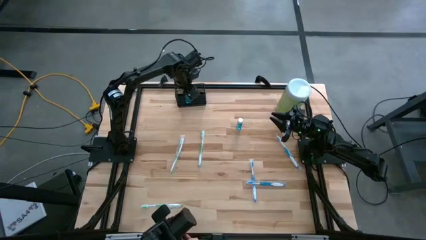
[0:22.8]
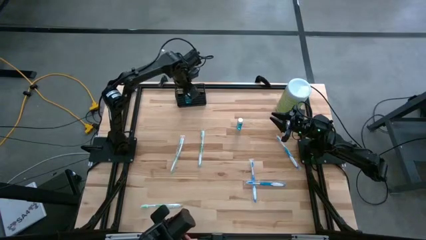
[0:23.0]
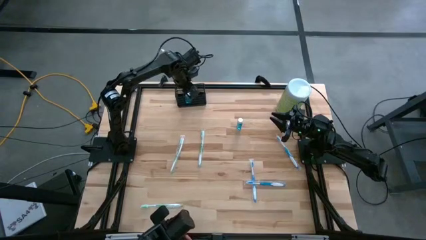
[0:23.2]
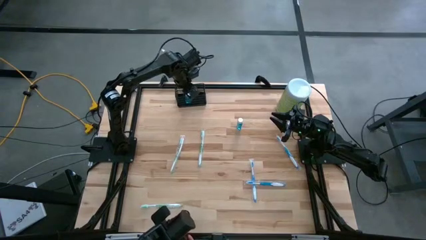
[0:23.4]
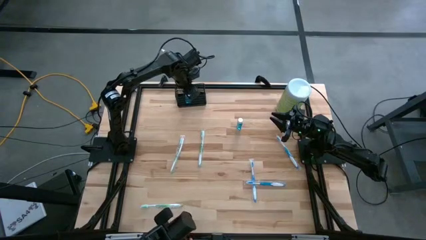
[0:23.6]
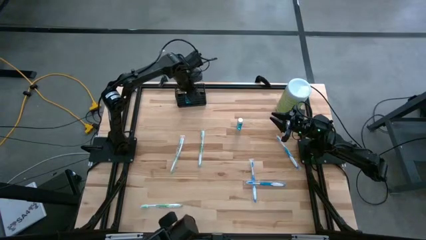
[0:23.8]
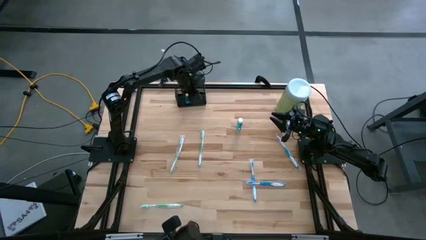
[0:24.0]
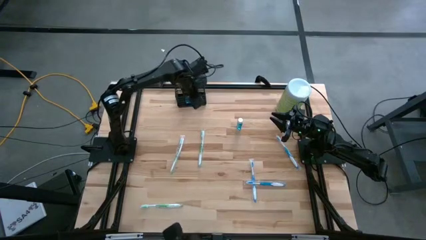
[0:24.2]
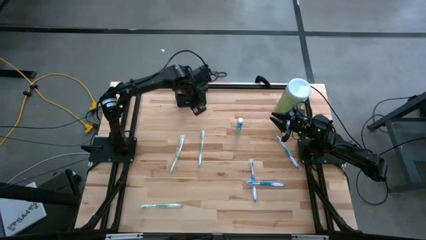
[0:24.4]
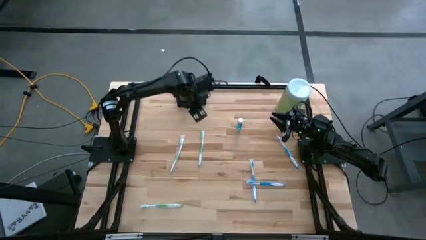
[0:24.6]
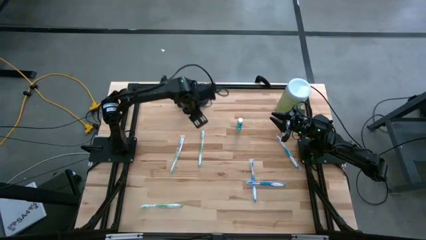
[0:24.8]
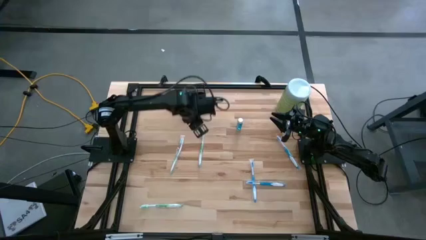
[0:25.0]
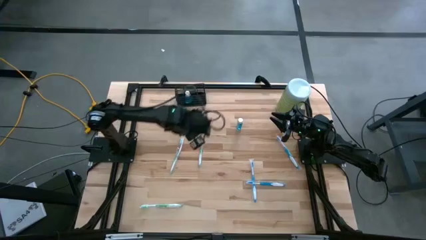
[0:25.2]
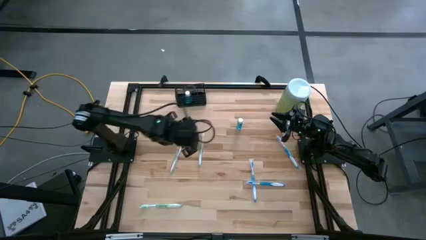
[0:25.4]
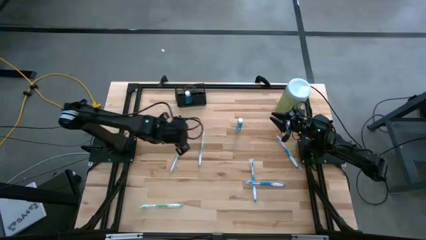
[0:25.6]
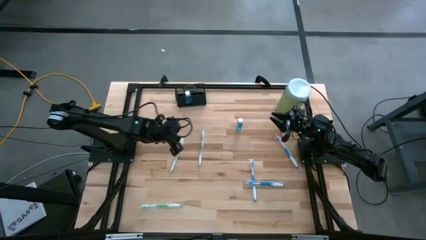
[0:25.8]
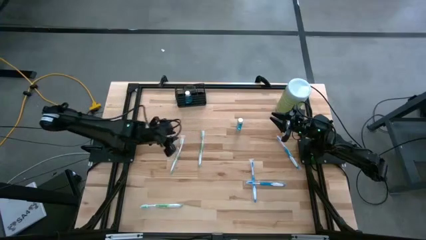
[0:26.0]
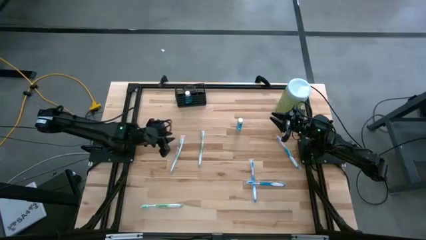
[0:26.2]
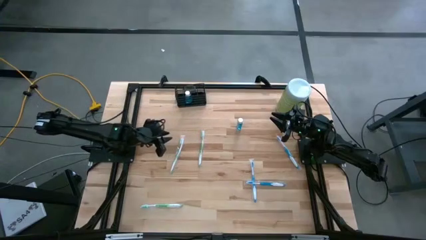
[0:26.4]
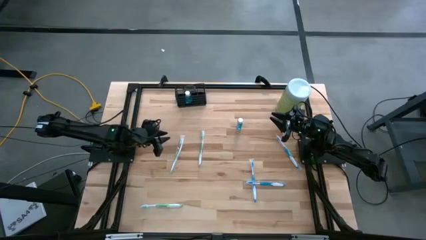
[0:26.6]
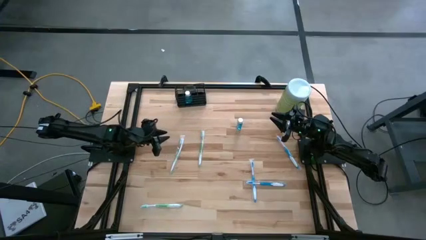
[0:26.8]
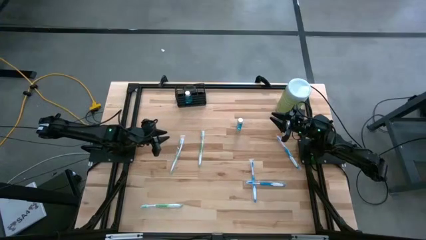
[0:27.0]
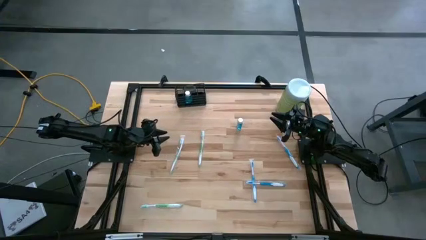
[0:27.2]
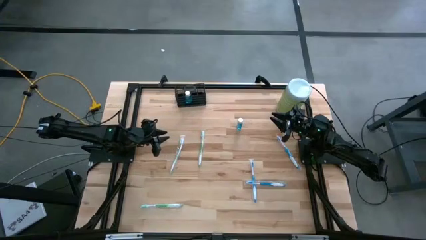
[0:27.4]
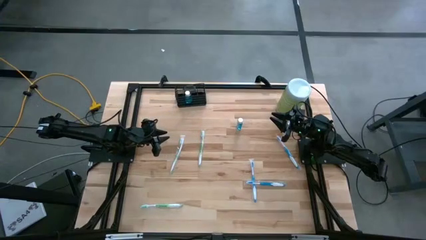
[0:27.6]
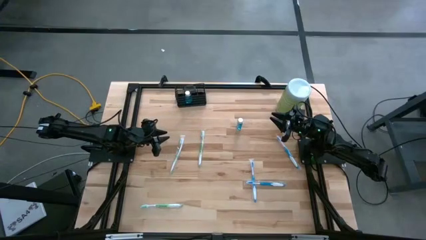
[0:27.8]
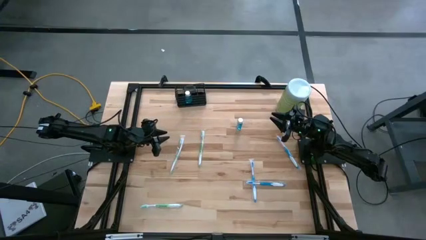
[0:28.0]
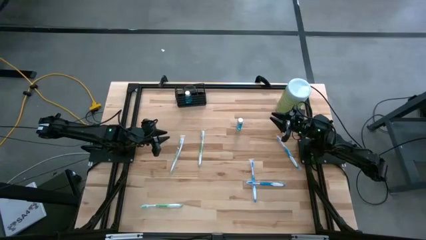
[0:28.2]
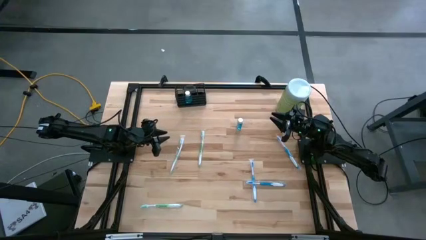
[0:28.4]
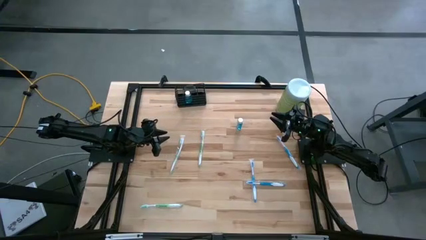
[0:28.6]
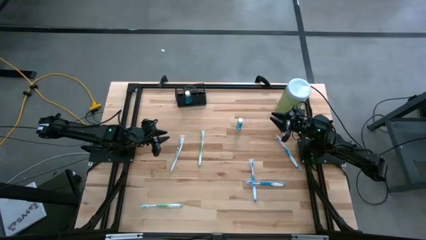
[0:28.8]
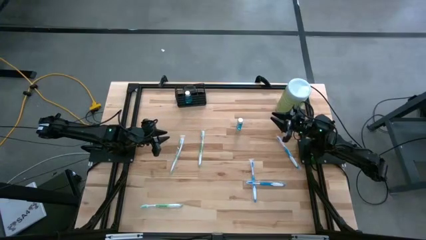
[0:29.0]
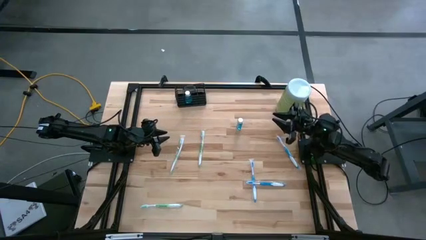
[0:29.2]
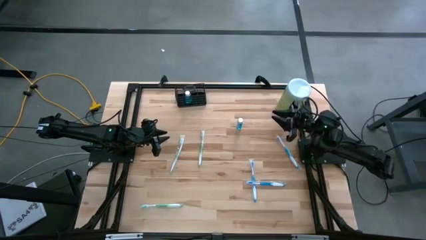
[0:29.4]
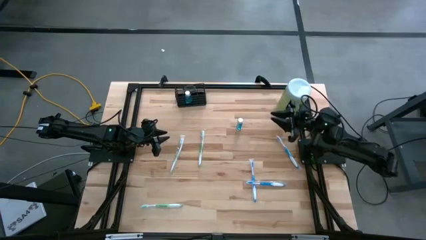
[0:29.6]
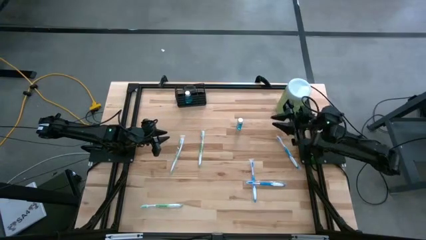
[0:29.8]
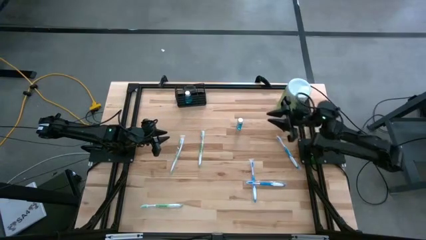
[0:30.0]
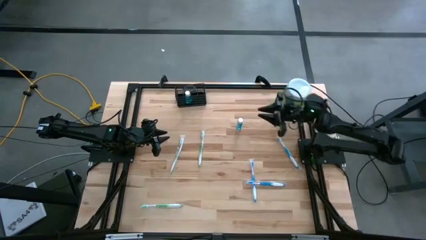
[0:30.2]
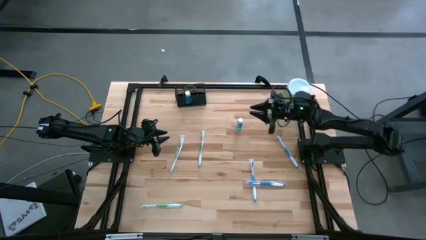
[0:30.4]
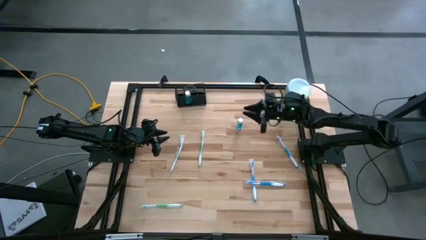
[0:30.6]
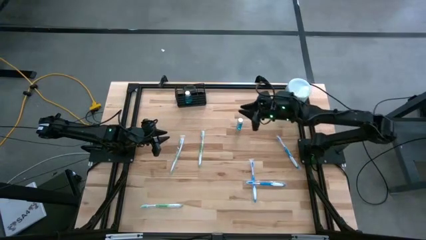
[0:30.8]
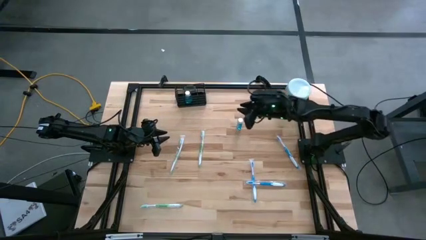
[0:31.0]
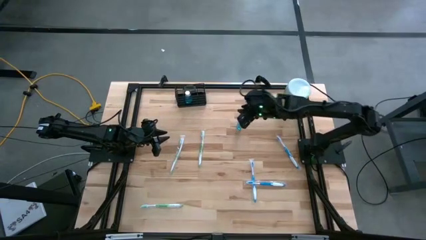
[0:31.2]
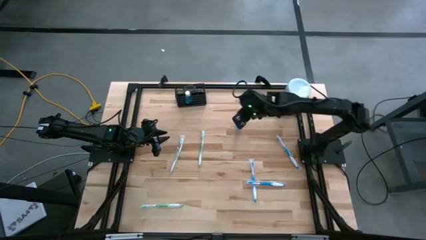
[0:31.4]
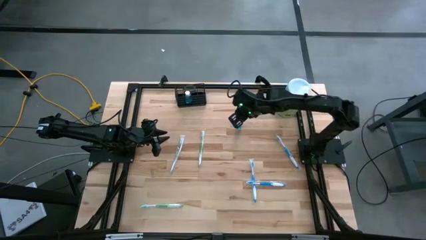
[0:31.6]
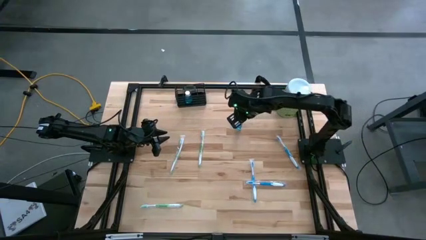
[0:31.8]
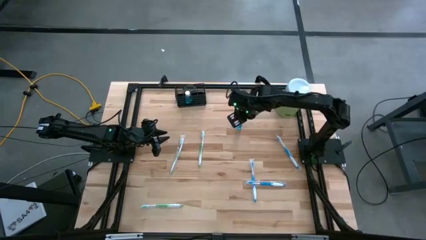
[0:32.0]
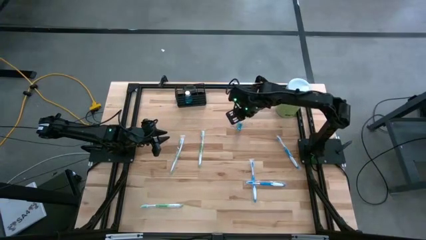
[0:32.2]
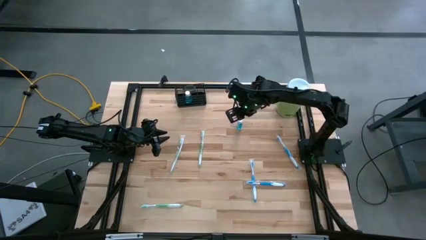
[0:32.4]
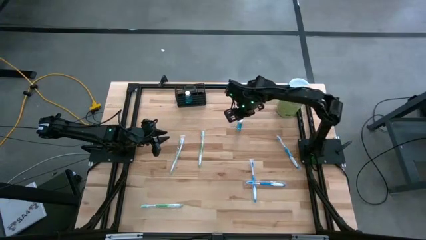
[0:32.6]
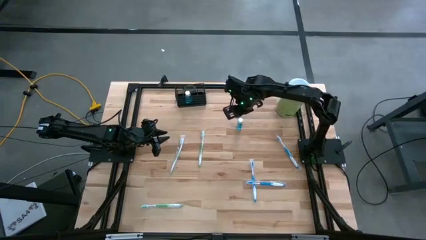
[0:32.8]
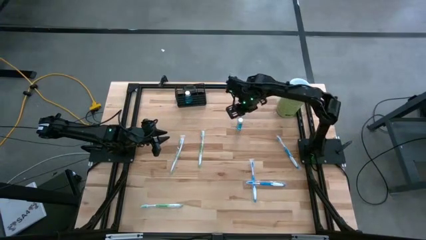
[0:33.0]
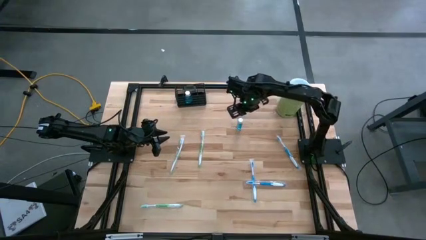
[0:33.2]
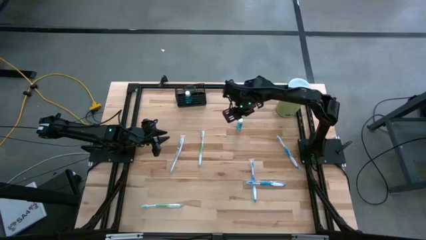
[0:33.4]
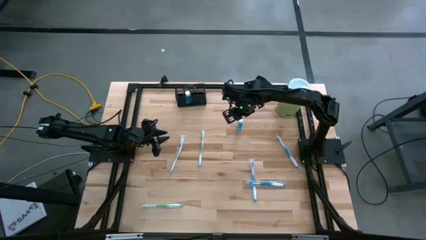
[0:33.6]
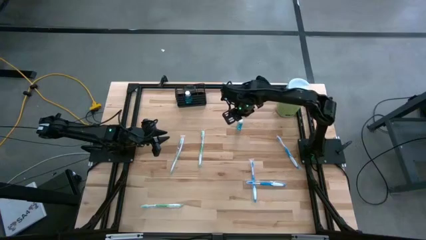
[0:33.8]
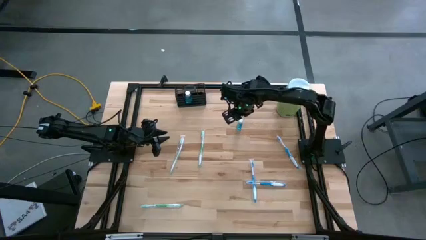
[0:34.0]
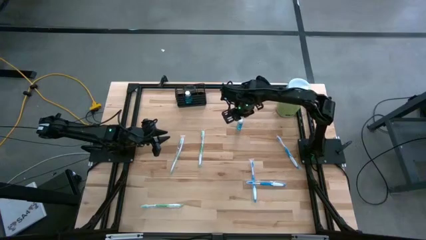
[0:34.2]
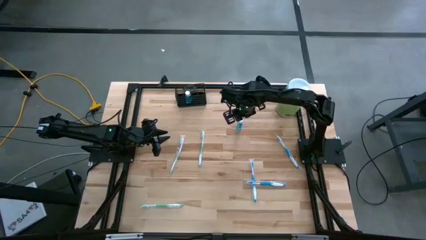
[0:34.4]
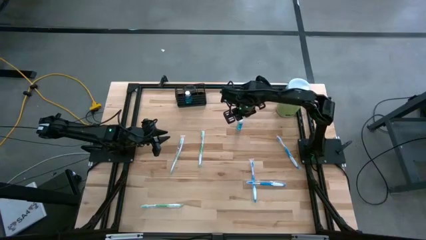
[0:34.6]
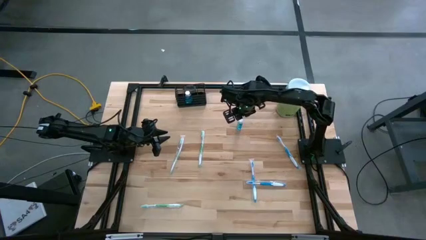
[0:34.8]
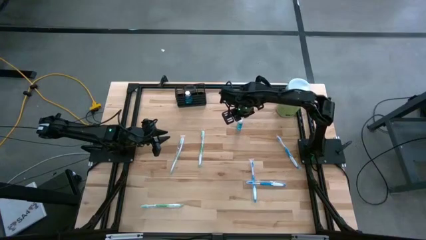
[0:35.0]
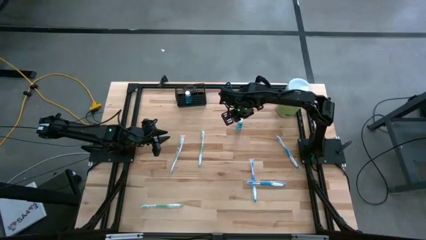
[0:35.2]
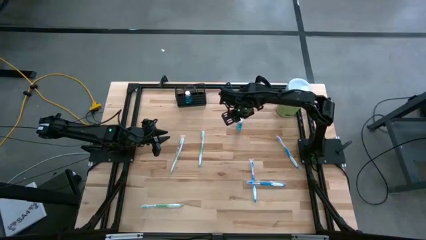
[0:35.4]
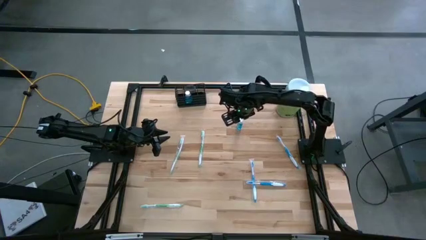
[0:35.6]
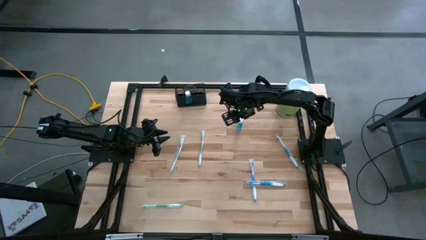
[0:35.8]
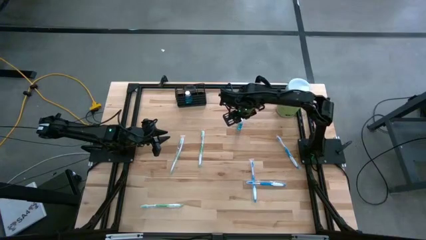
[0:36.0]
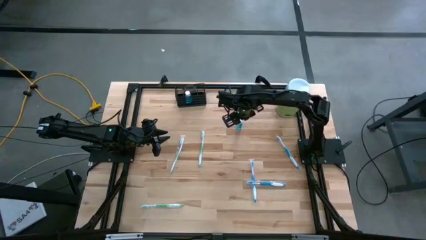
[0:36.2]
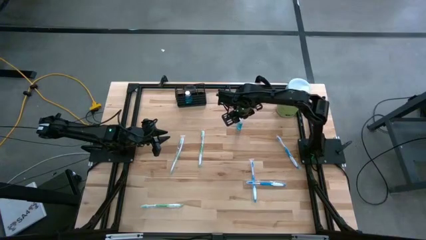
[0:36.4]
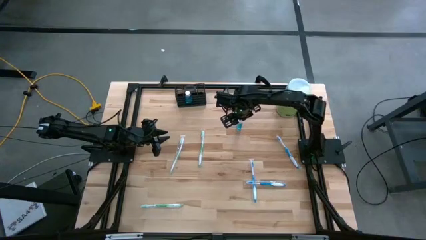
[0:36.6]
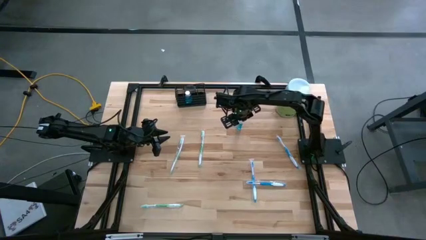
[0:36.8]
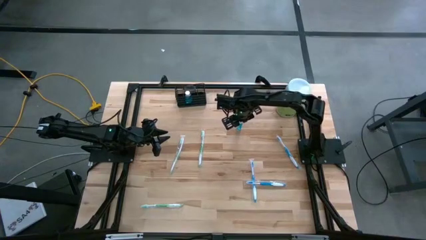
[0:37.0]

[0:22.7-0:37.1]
Task: Pick & Place toothbrushing station
Put the blue mouthwash bottle into the wire organizer
